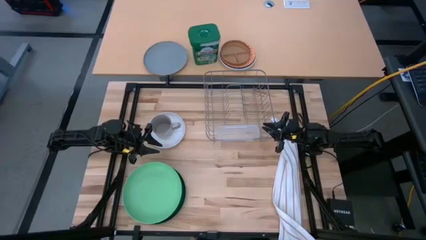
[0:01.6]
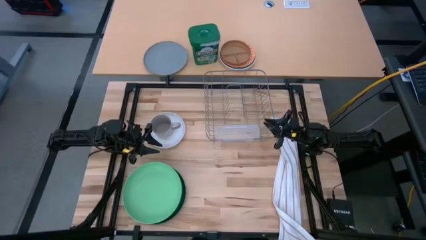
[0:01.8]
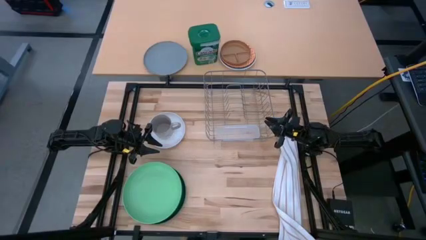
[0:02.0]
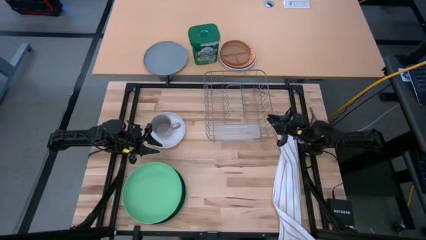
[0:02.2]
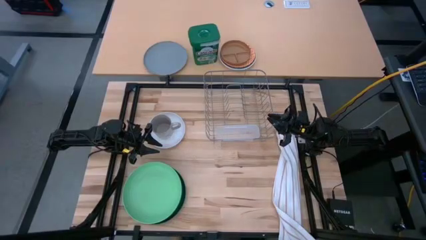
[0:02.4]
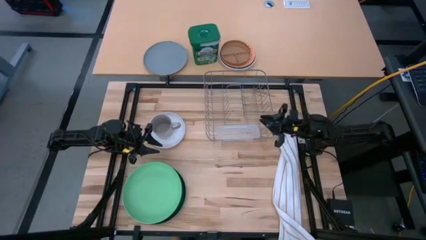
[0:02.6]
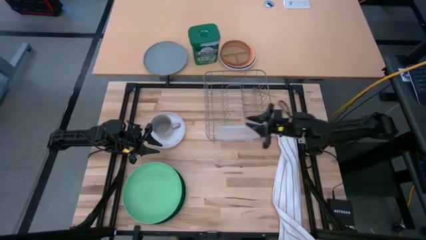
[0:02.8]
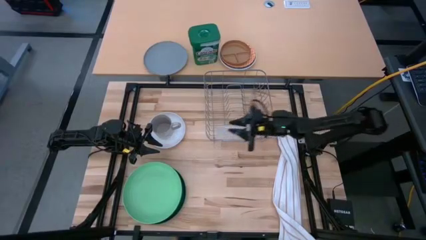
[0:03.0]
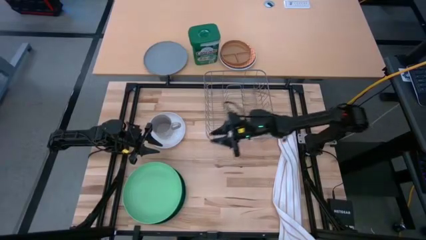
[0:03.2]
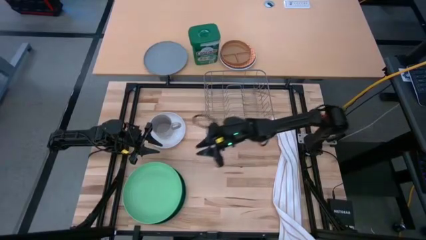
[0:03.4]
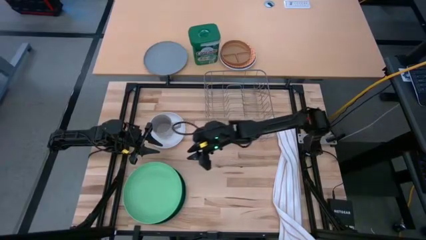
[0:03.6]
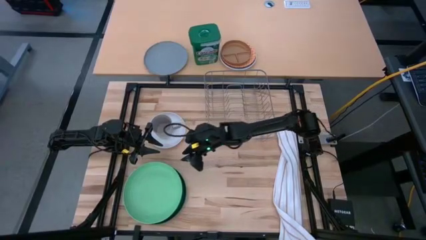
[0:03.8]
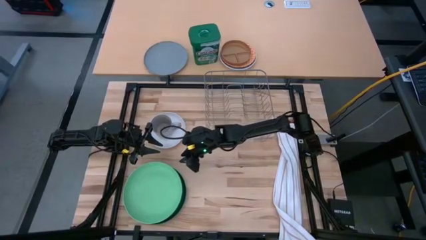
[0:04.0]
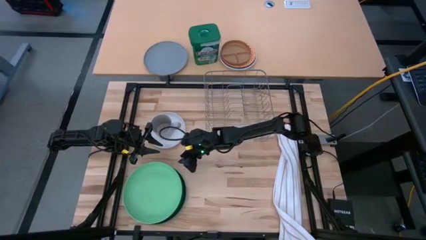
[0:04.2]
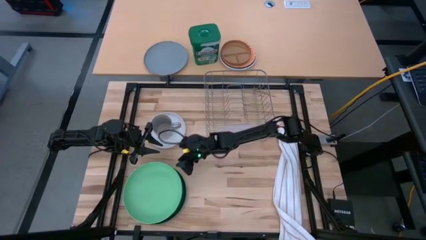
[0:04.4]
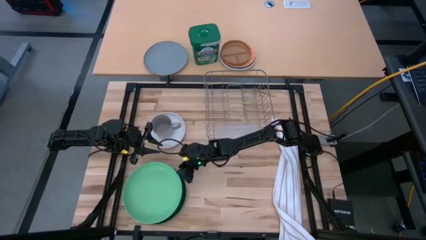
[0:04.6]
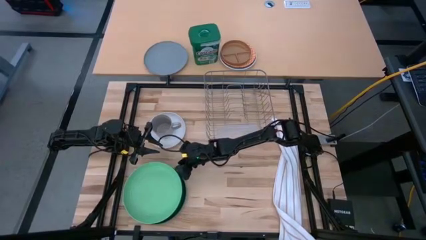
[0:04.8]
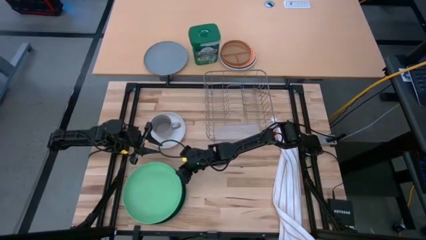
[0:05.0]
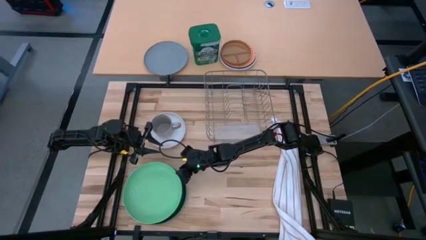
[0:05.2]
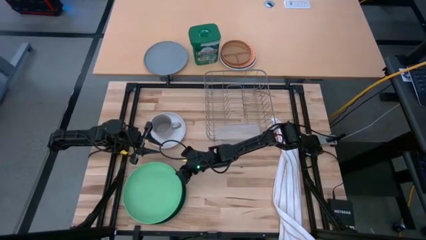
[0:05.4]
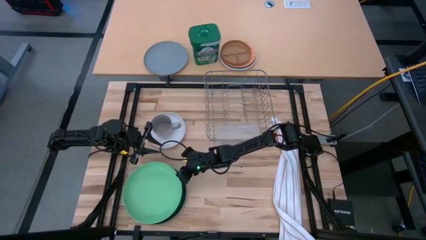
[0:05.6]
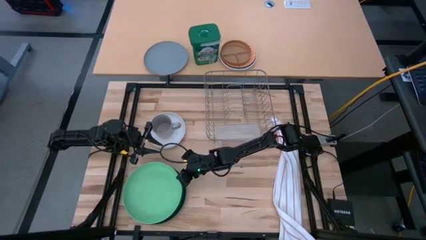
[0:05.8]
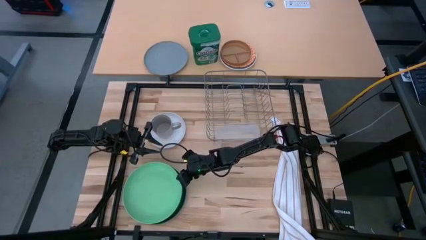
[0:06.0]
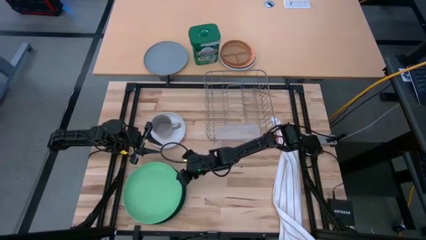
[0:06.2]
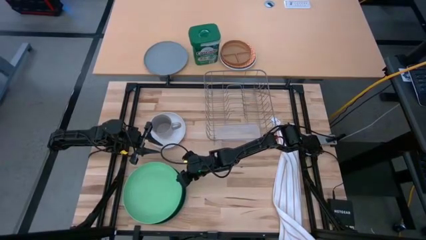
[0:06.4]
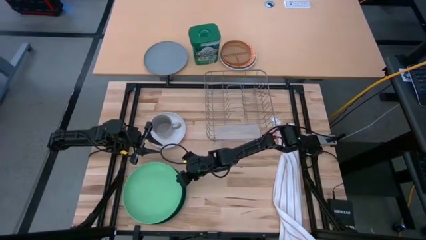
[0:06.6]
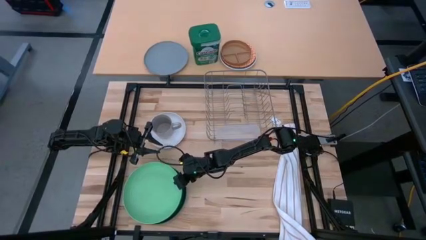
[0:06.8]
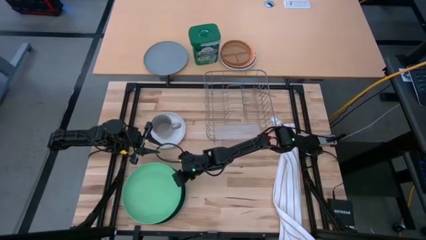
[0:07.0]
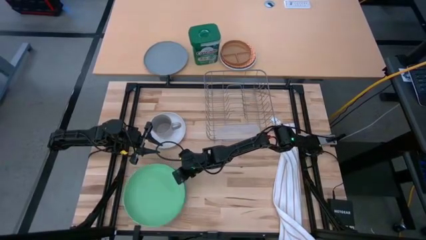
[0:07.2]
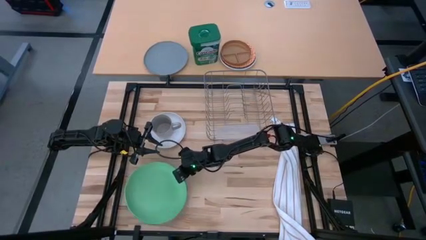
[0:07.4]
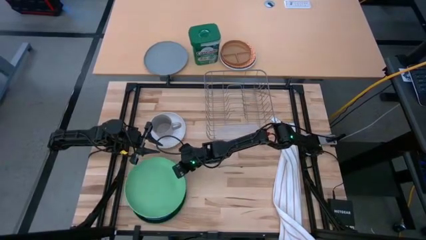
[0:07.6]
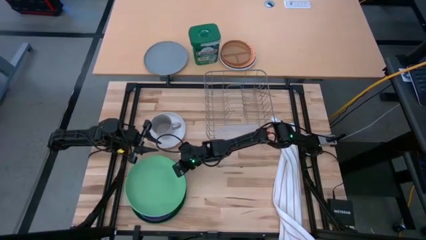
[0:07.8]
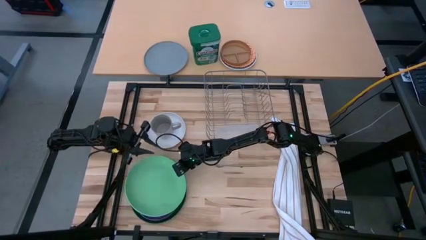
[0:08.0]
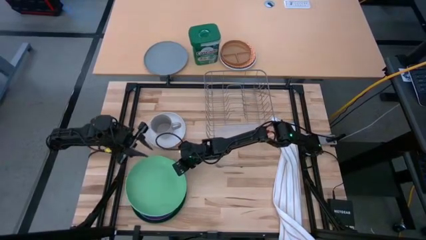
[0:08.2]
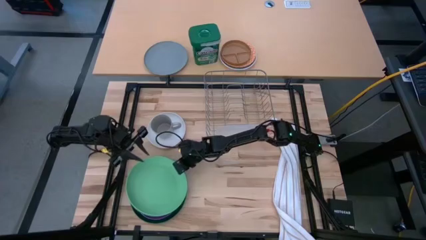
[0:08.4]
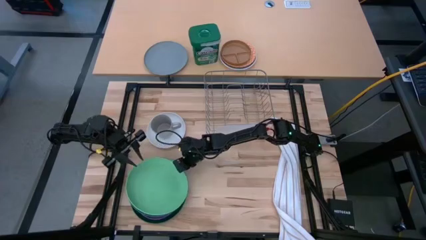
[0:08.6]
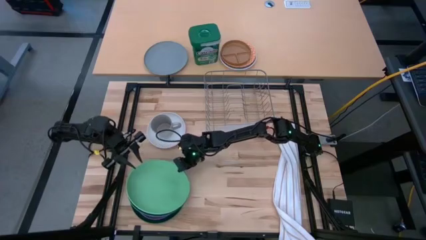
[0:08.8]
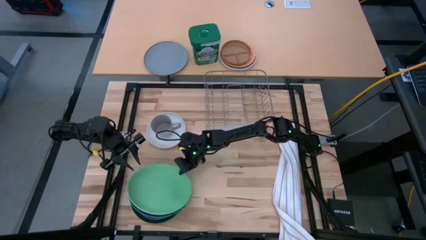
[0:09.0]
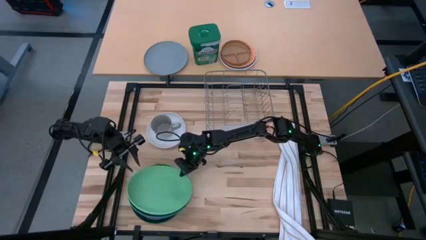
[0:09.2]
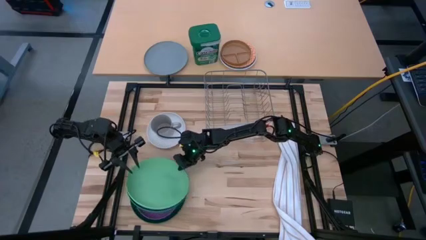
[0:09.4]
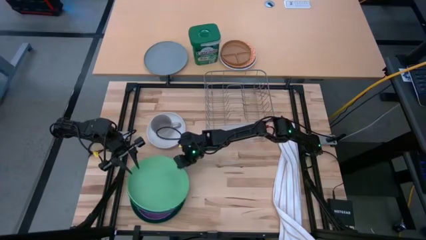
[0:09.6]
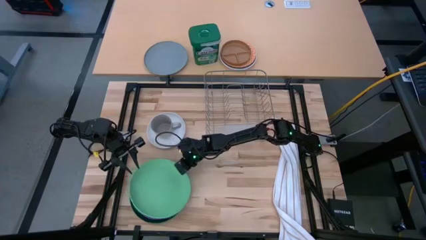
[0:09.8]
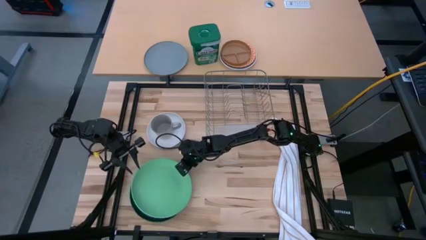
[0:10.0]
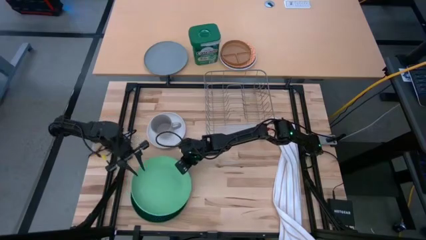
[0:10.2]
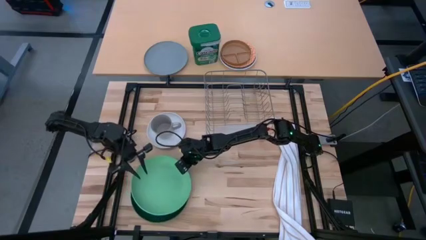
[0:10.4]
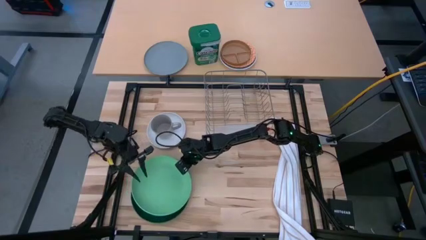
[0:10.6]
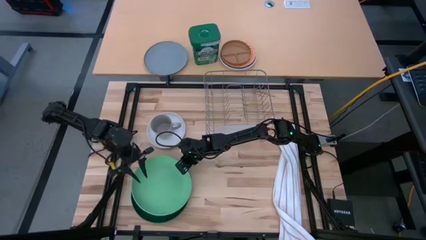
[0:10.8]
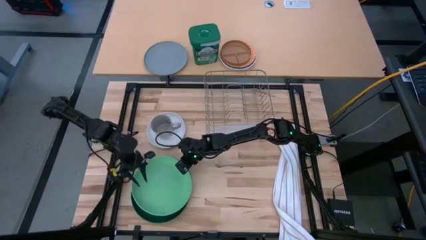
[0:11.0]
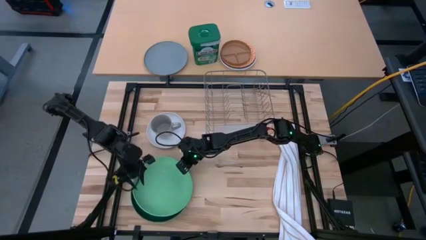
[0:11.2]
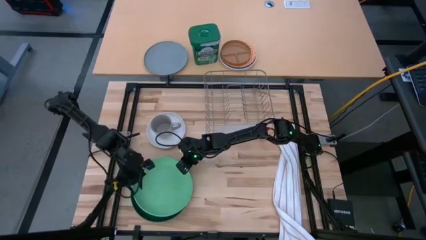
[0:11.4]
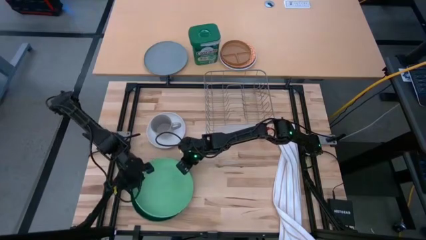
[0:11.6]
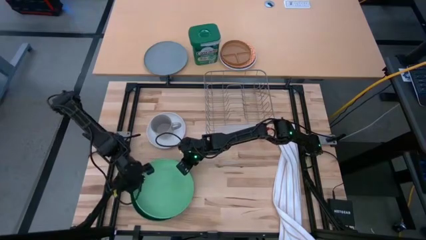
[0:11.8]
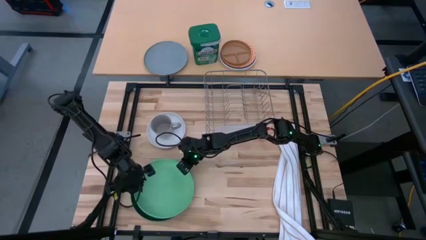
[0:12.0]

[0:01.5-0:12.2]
Task: Sort dishes
Put the light green plate into the dish rack
